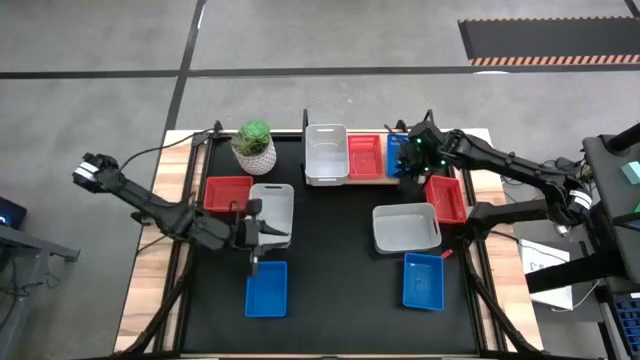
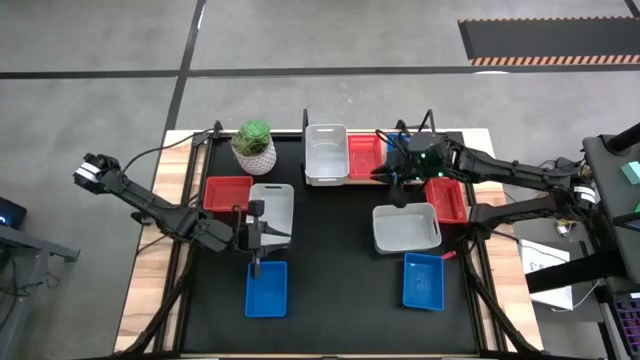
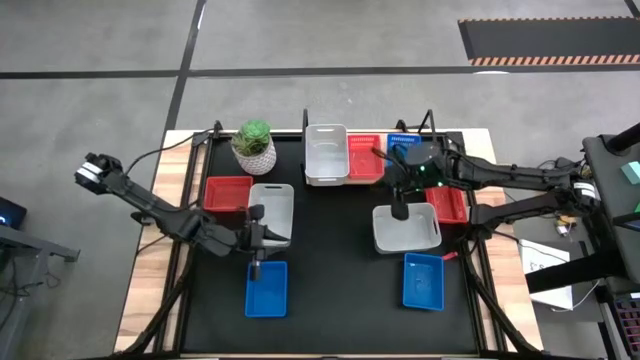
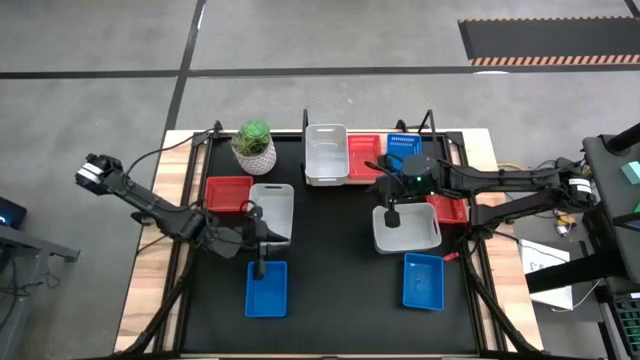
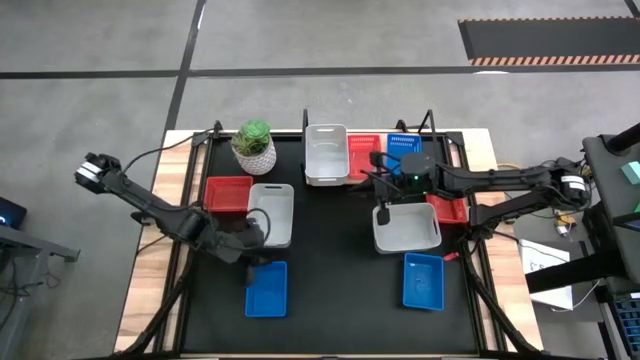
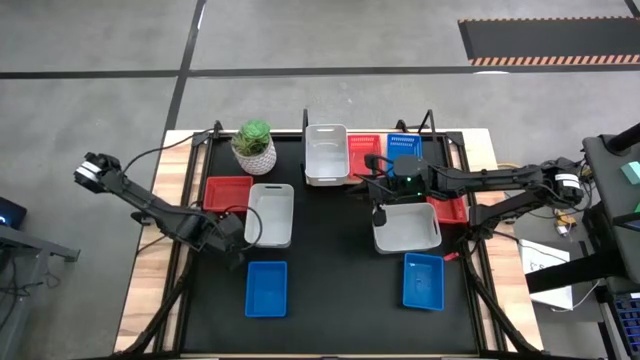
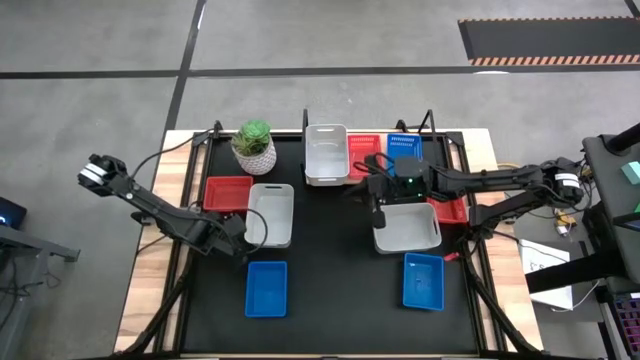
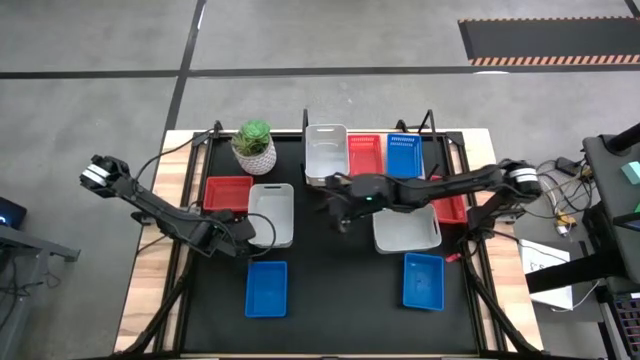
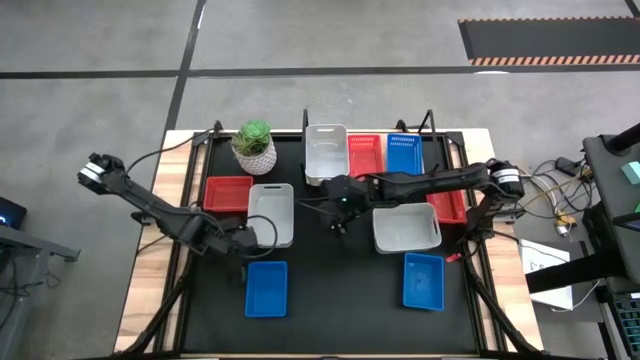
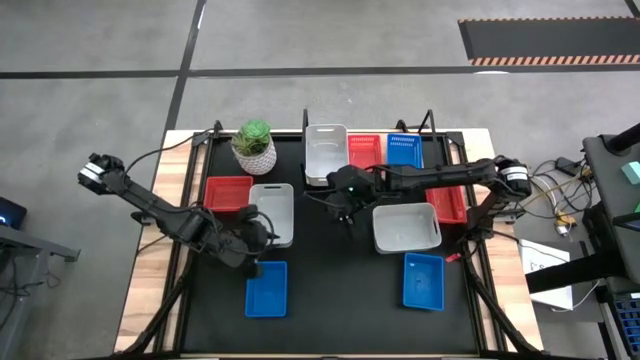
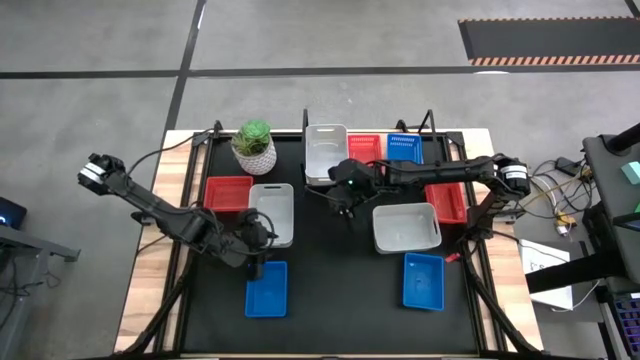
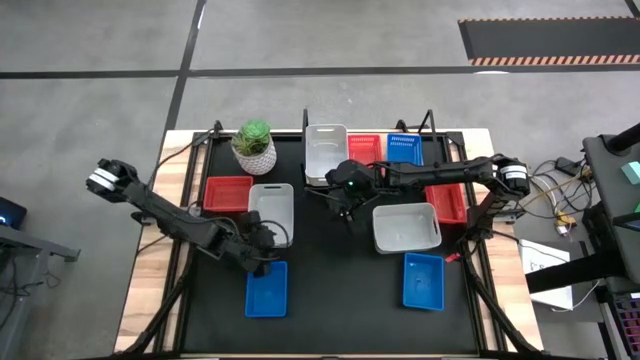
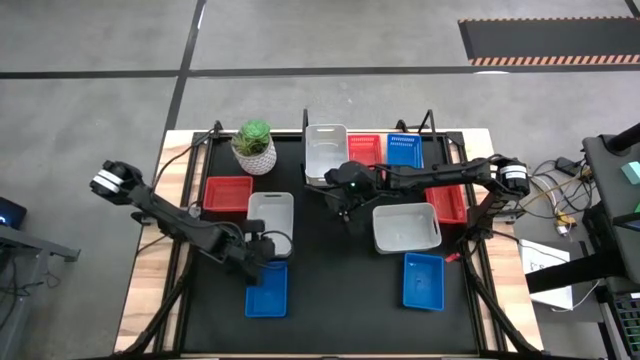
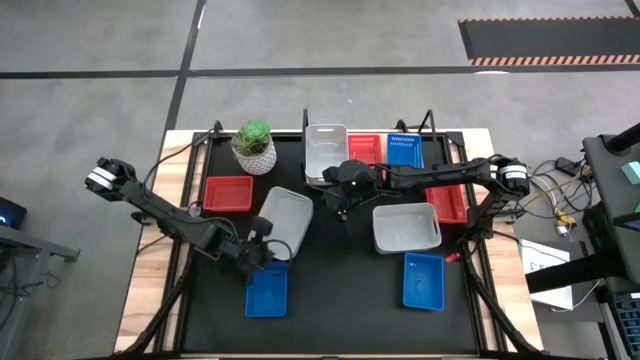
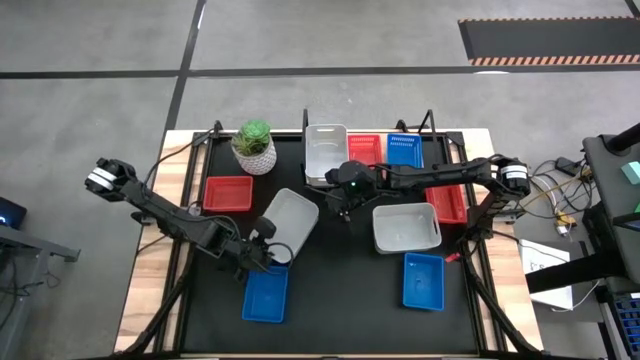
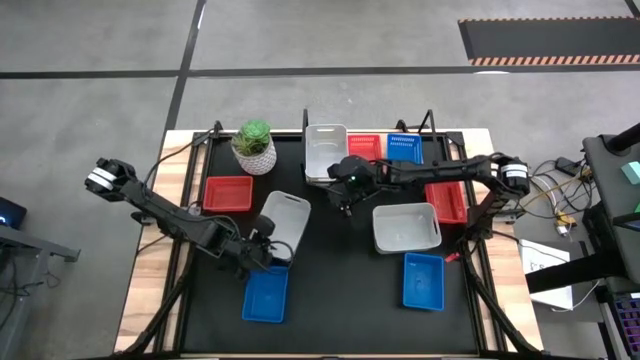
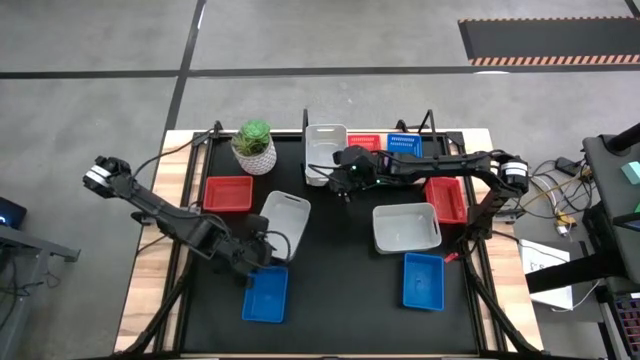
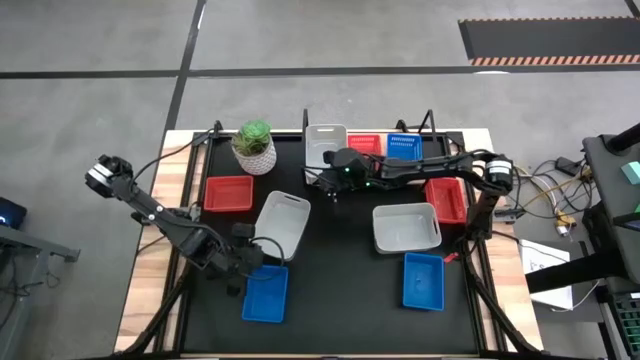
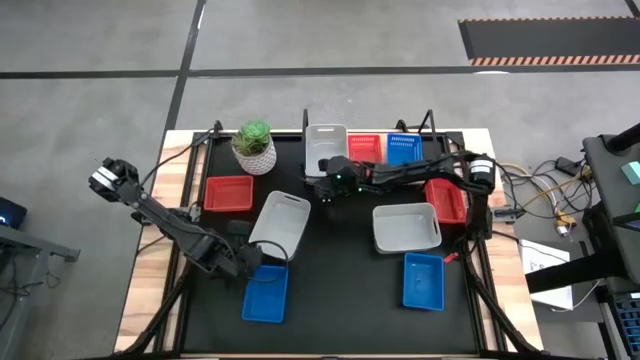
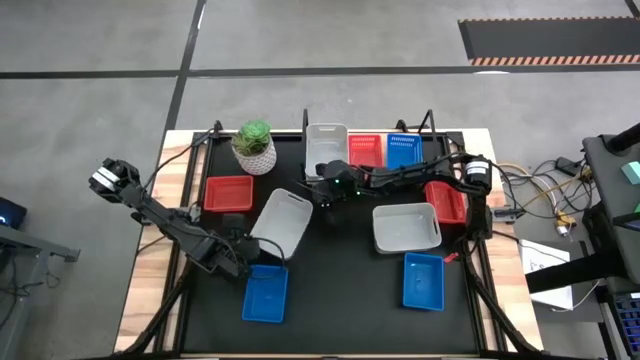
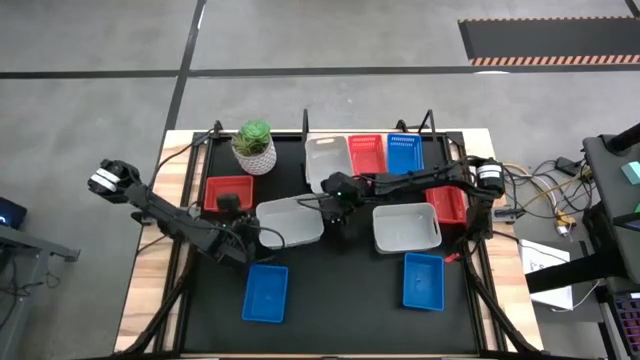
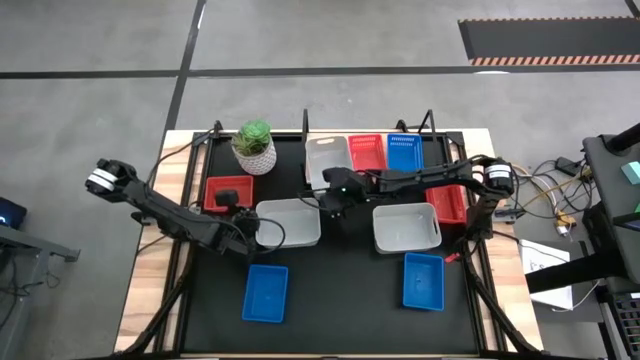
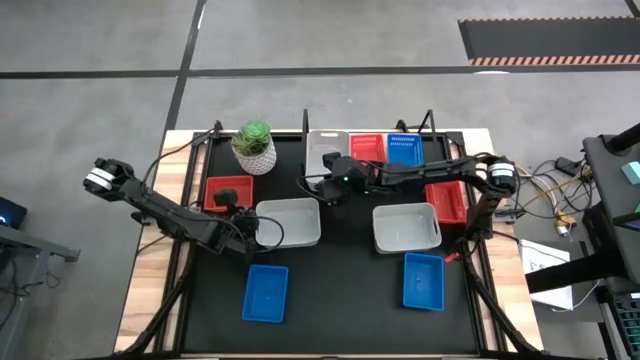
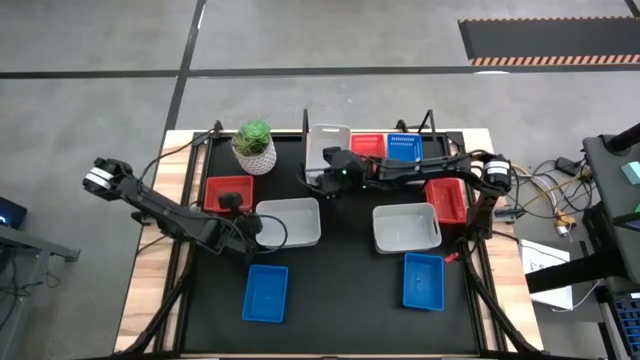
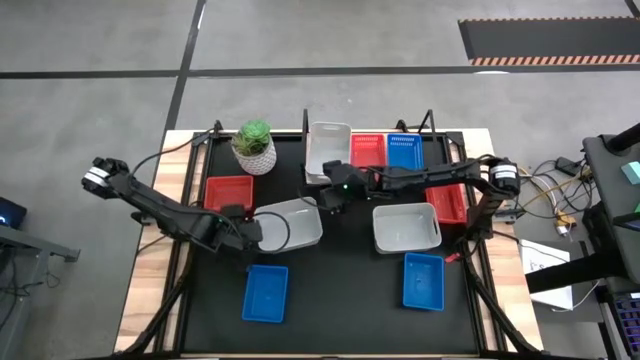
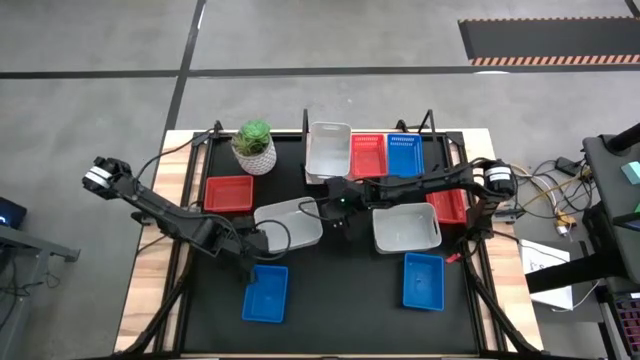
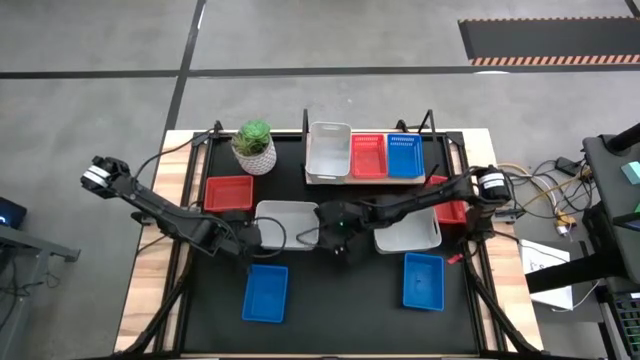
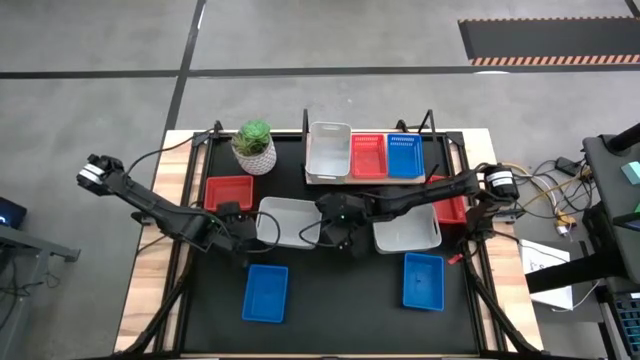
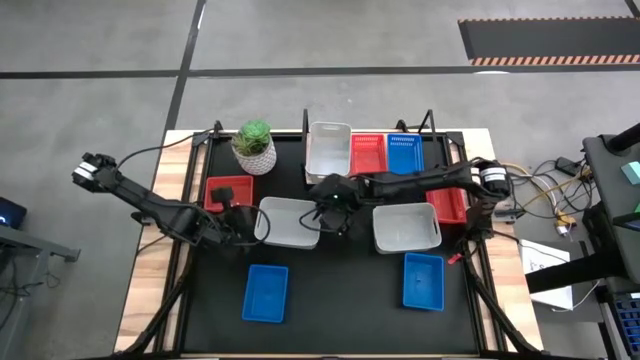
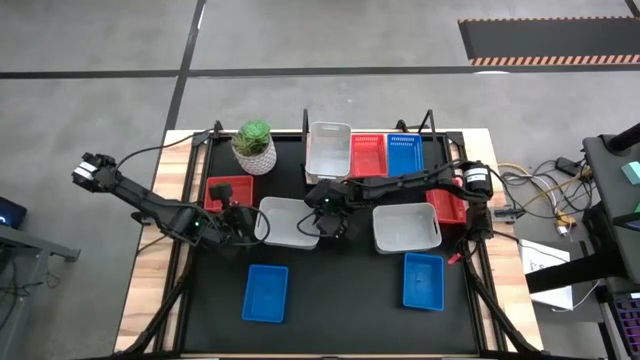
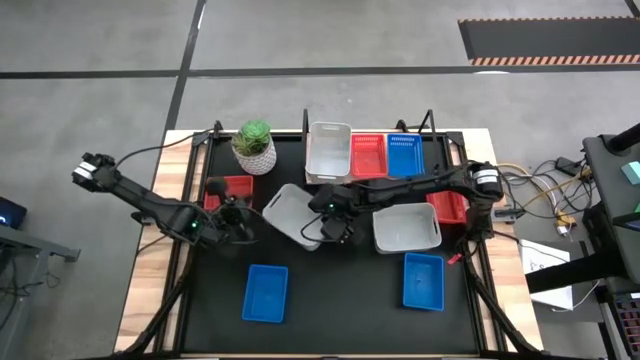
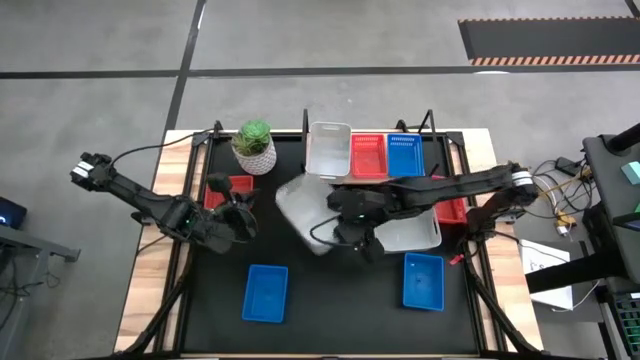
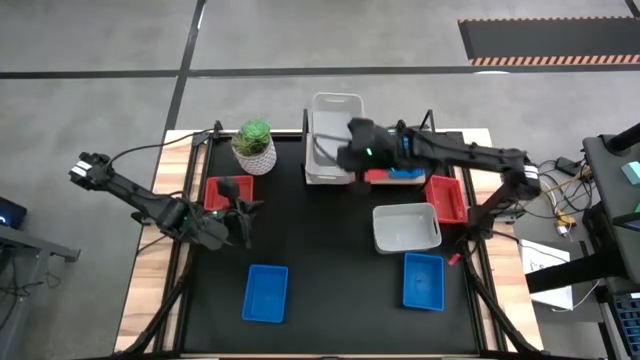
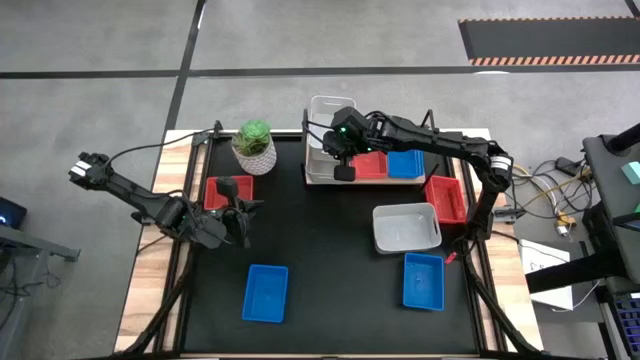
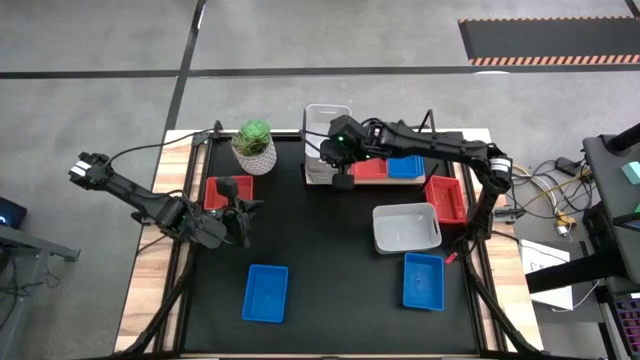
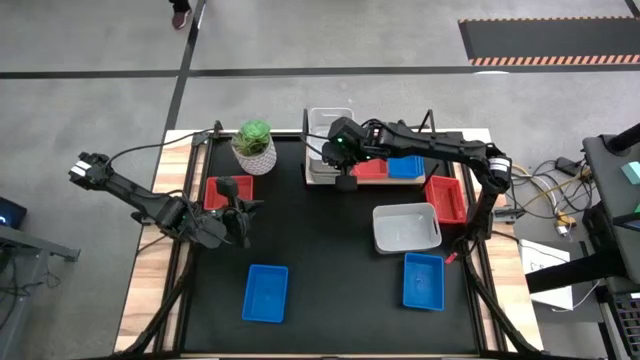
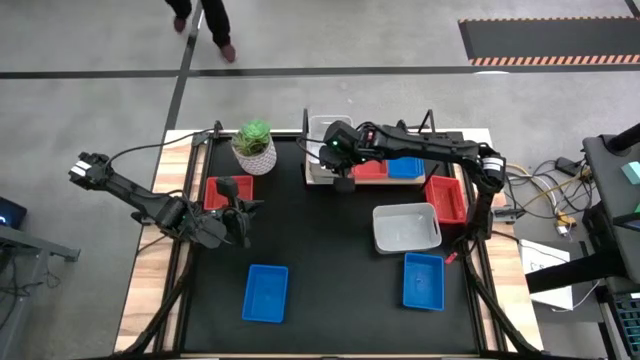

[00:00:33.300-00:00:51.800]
Task: Stack baskets on shelf by color
Stack the left white bin on the white bin on the shelf

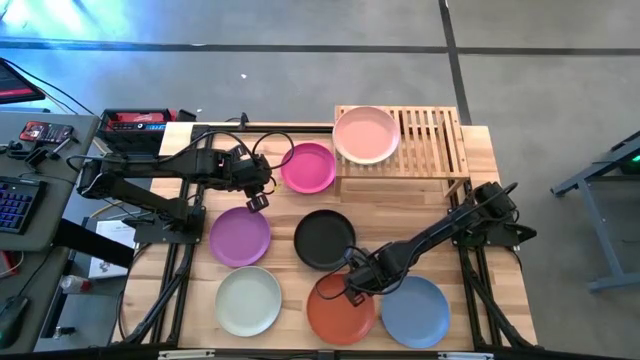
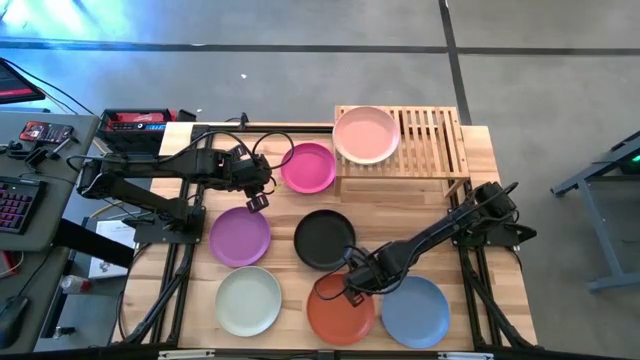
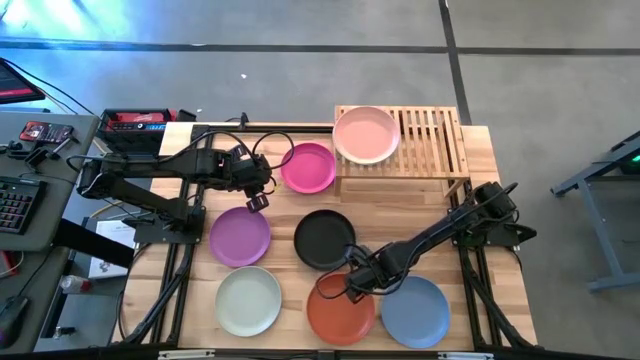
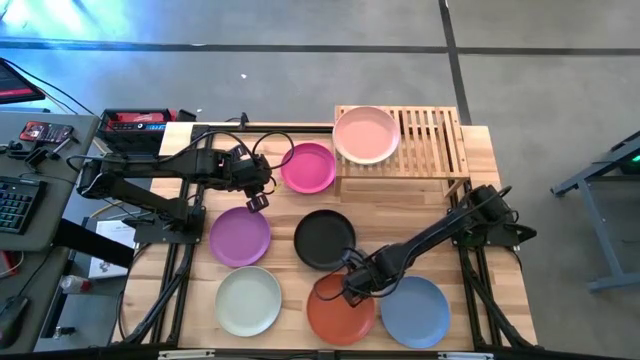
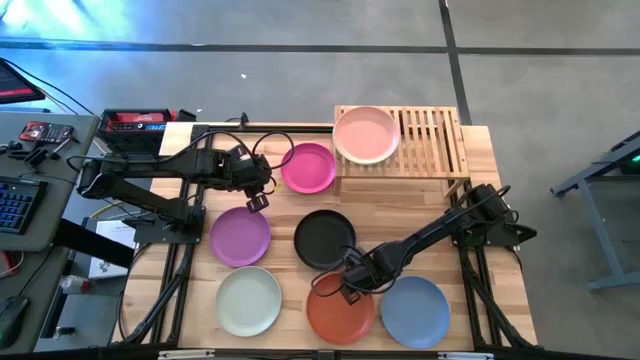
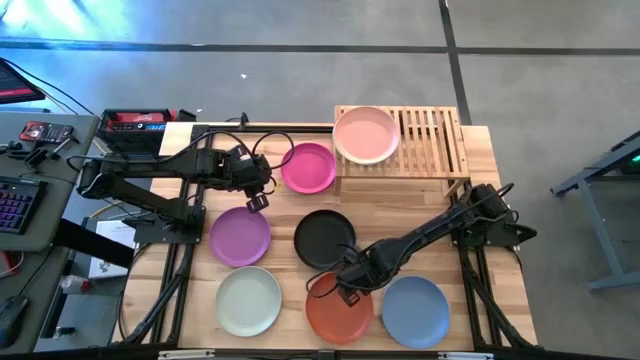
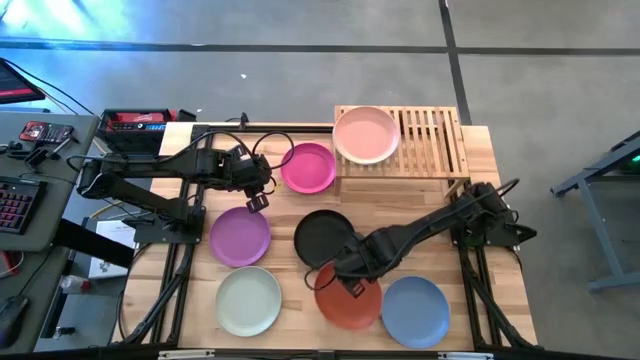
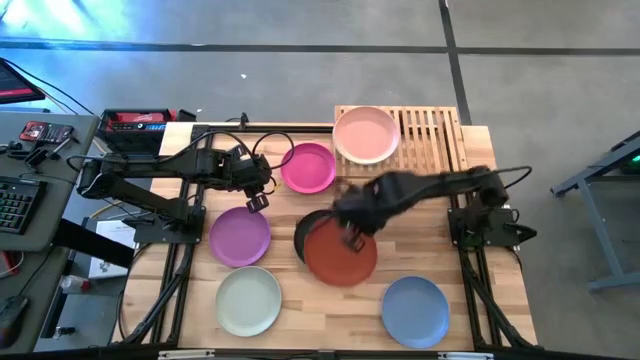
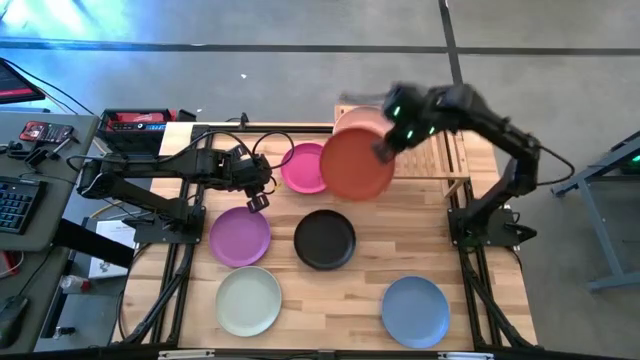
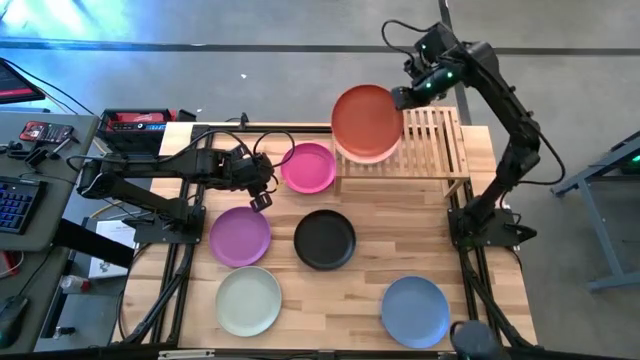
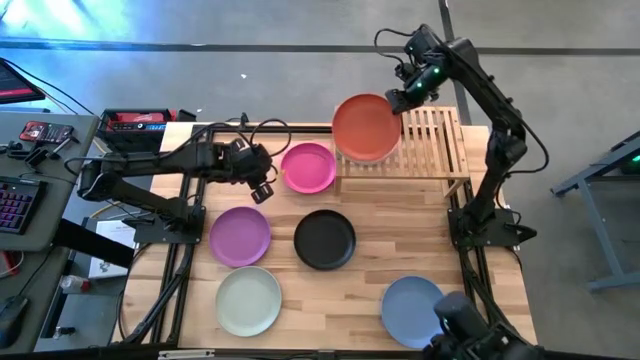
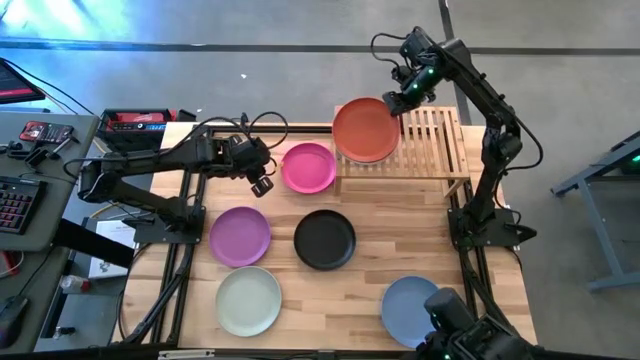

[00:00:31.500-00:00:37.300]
Task: Place and stack plates onto a shelf
Stack the orange plate on the light pink plate
